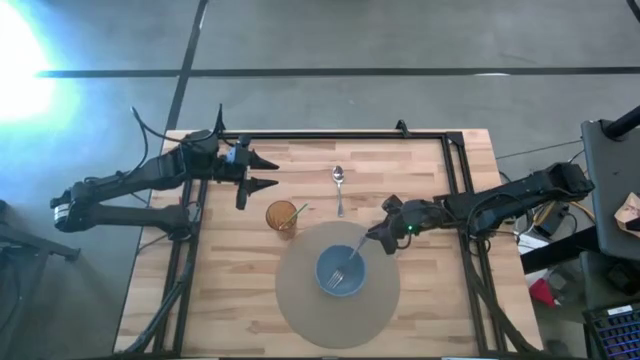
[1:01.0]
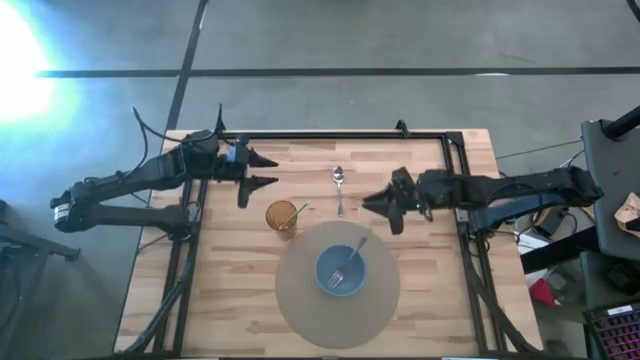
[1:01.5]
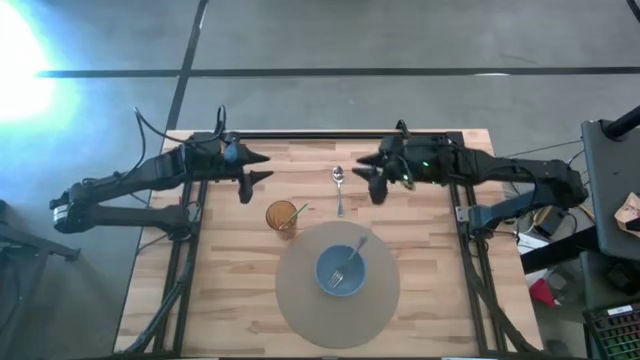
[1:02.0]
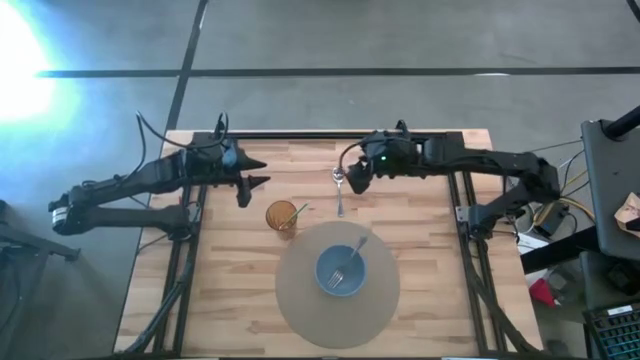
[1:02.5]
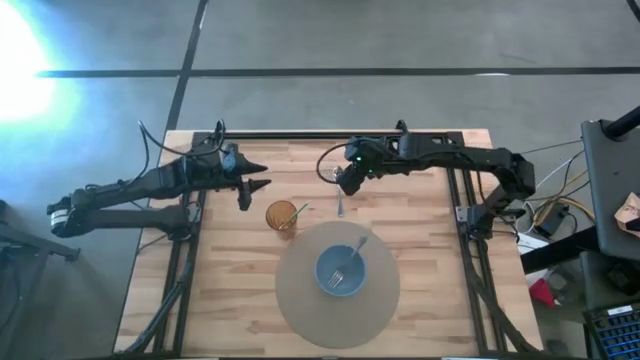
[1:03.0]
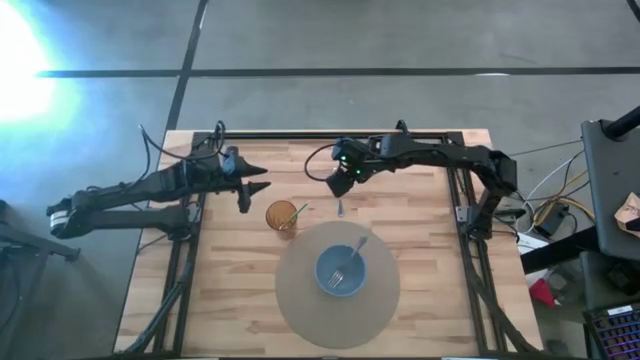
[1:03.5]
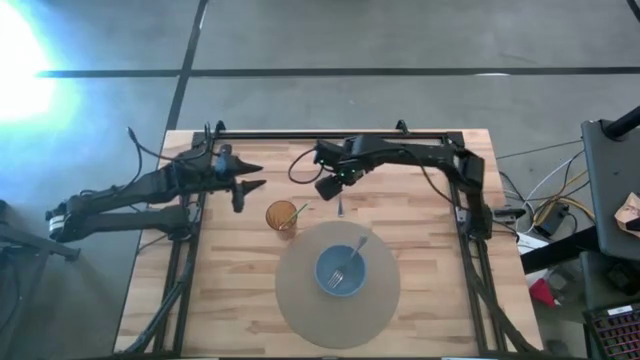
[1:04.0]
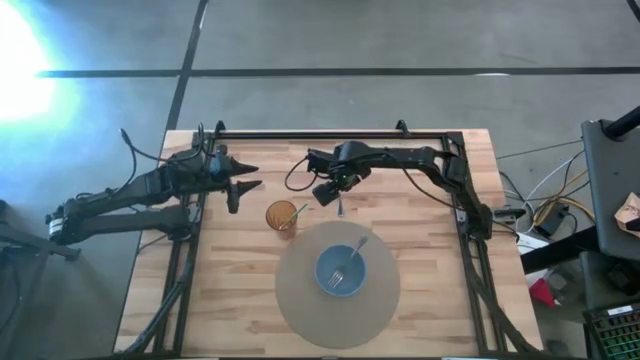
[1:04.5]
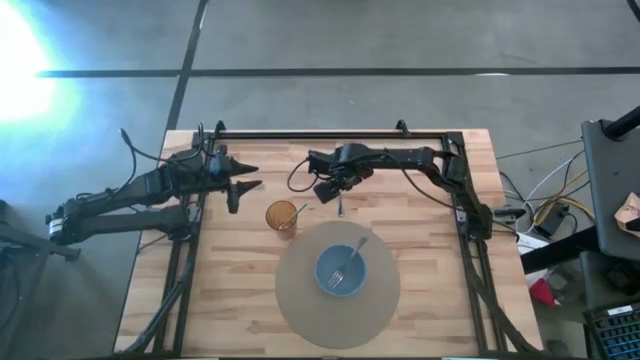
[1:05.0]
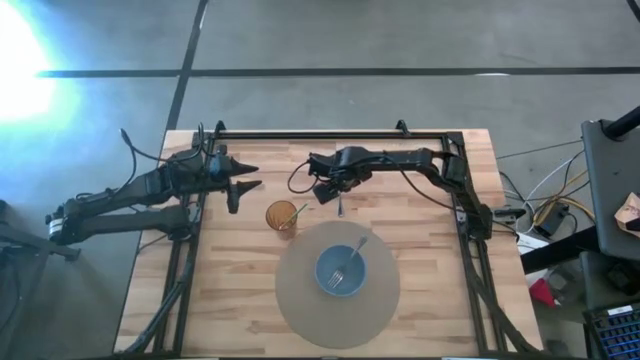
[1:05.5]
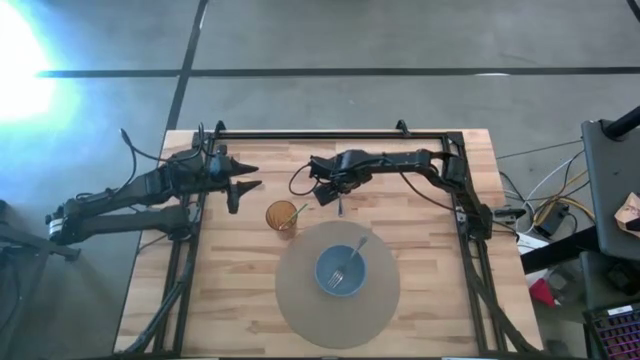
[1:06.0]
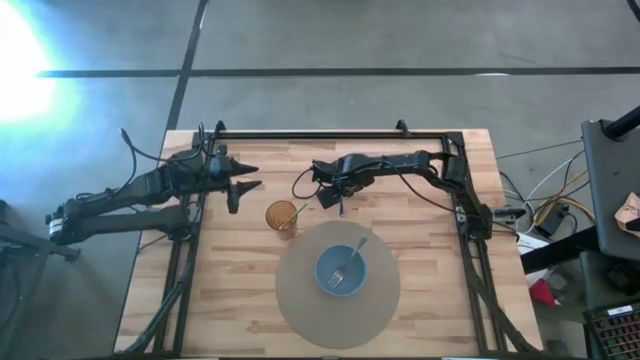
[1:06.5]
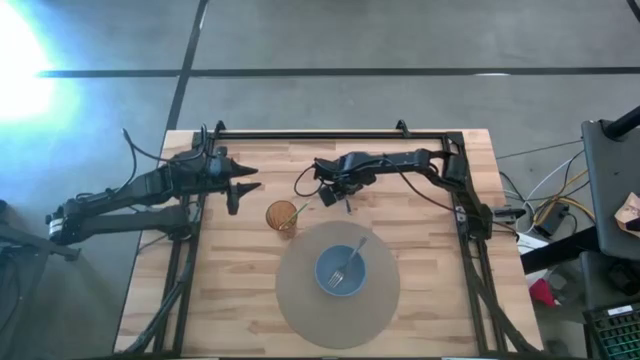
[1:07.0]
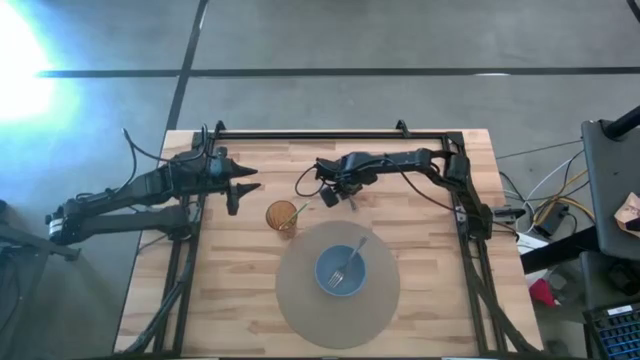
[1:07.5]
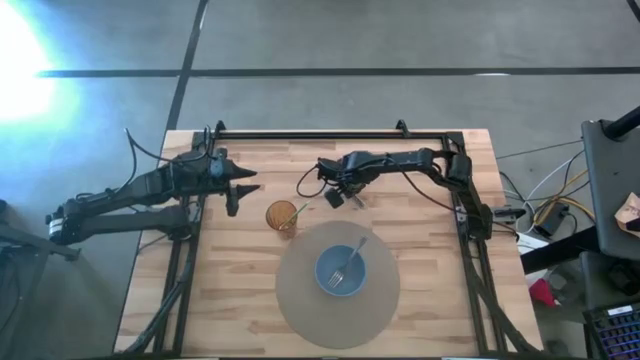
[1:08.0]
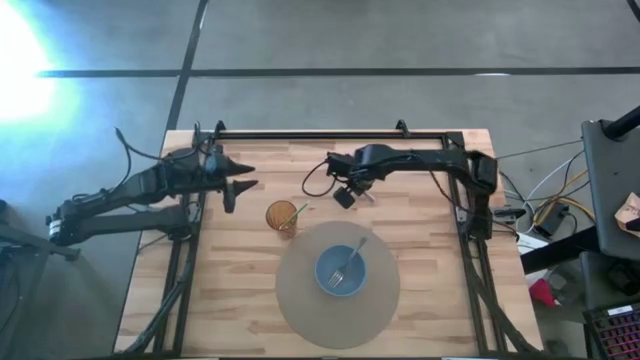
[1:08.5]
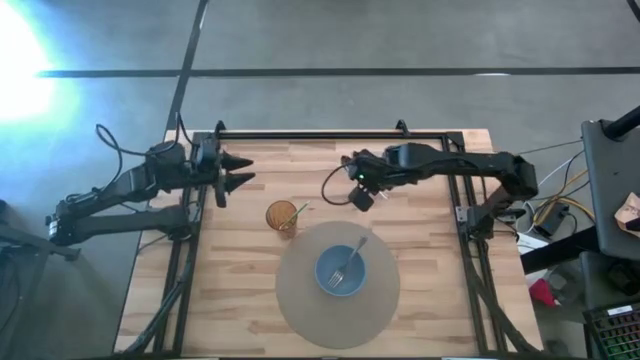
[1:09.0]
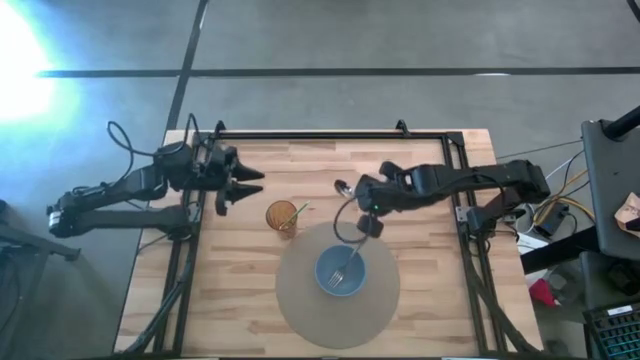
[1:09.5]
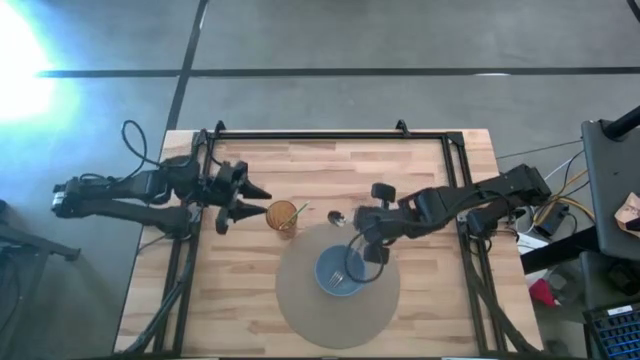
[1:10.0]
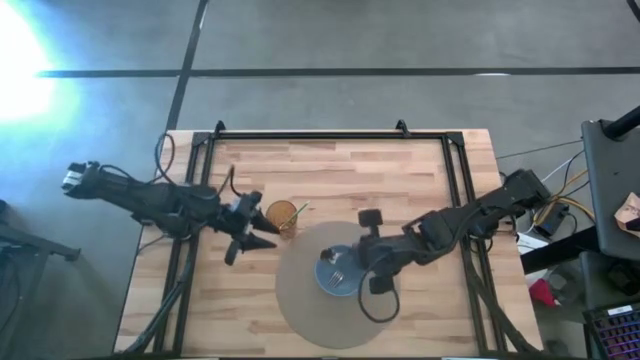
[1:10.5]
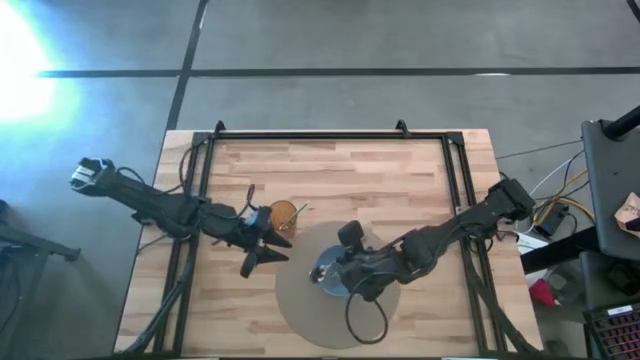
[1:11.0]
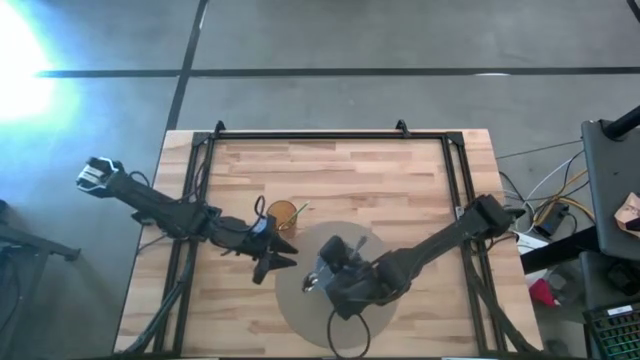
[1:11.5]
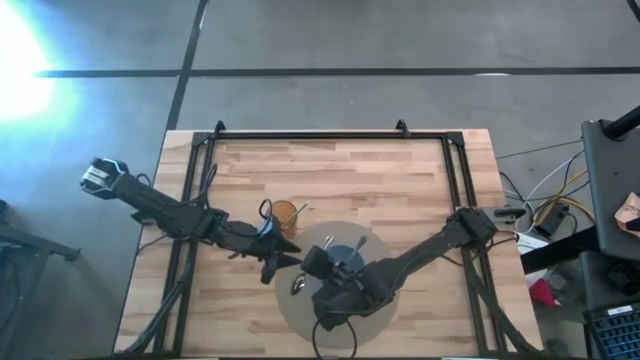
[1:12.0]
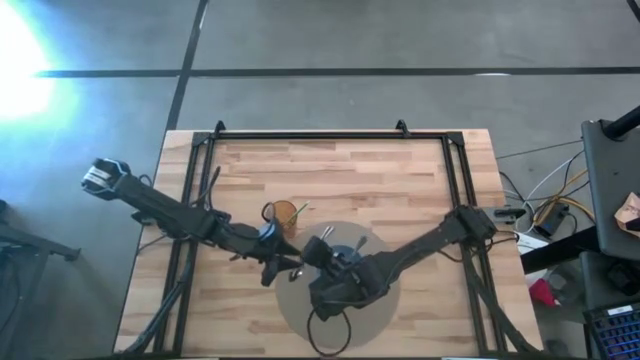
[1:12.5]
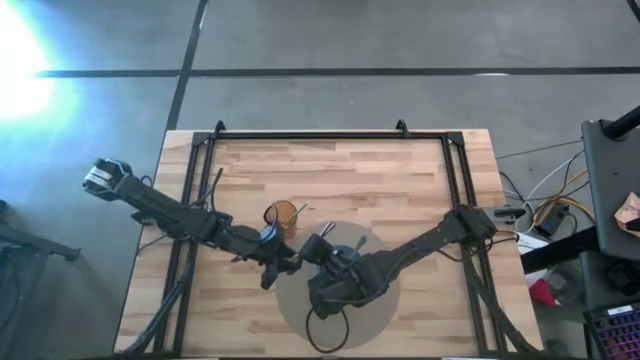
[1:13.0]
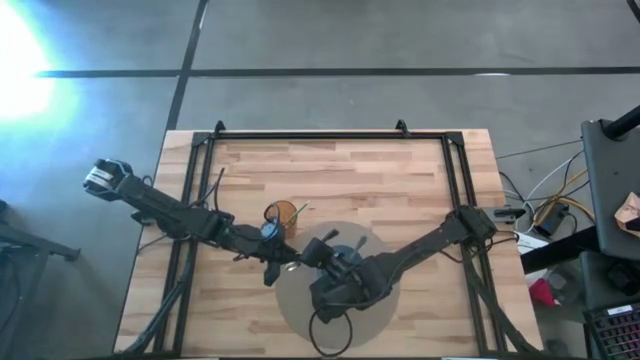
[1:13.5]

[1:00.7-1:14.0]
Task: Pick & Place Utensil
Put the silver spoon into the blue bowl

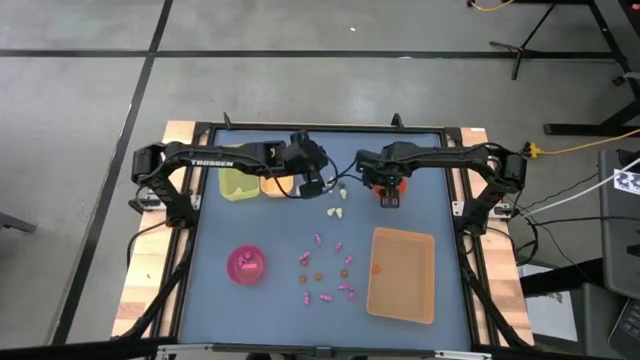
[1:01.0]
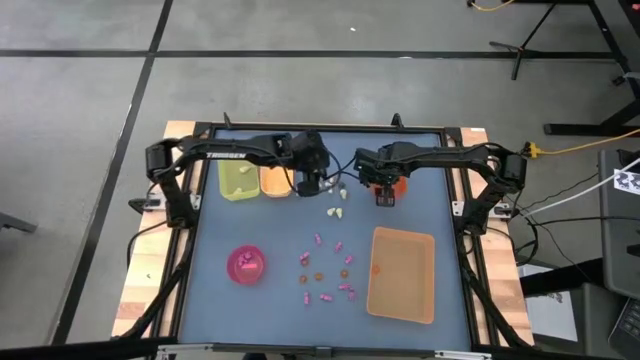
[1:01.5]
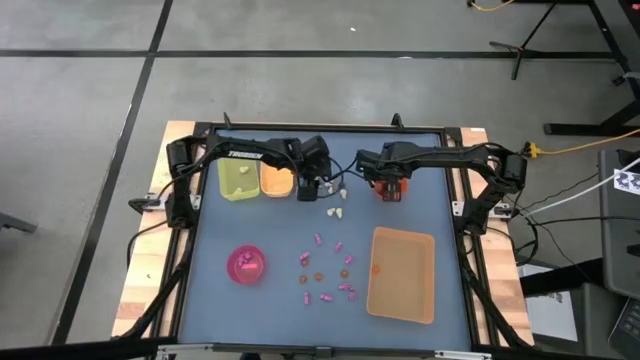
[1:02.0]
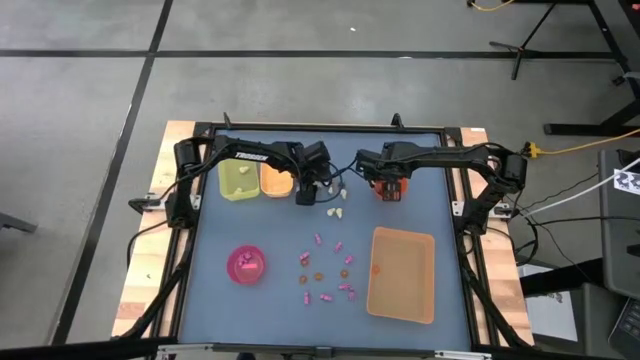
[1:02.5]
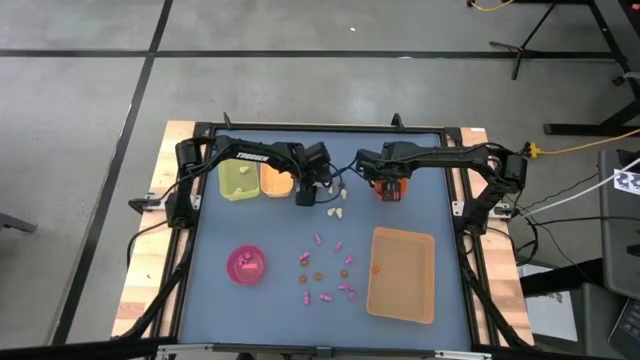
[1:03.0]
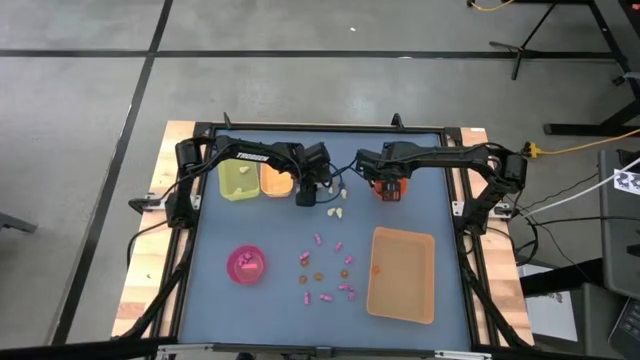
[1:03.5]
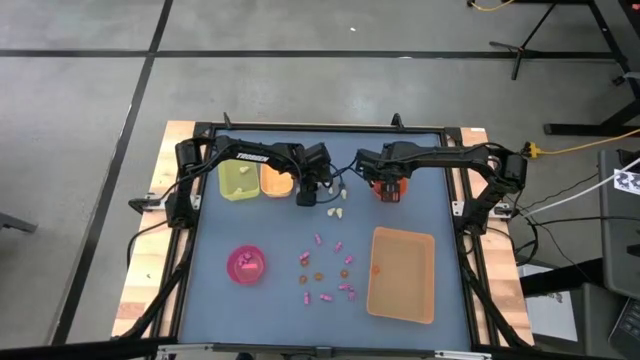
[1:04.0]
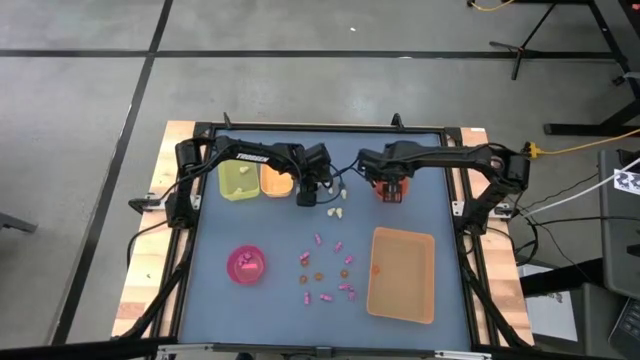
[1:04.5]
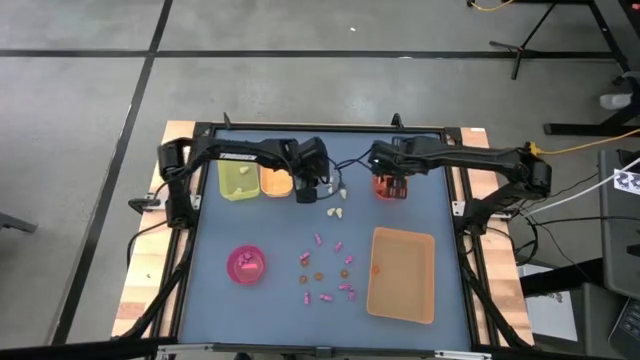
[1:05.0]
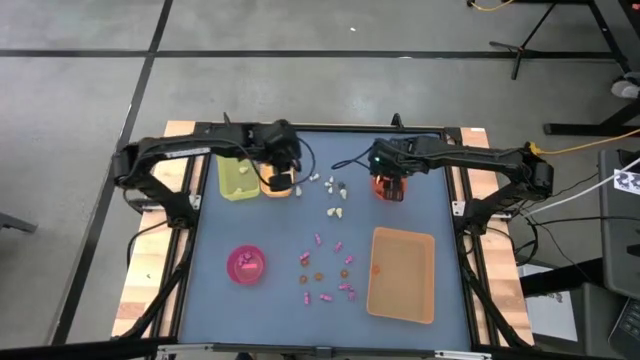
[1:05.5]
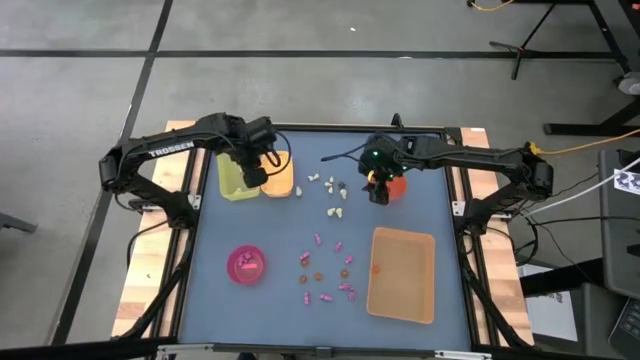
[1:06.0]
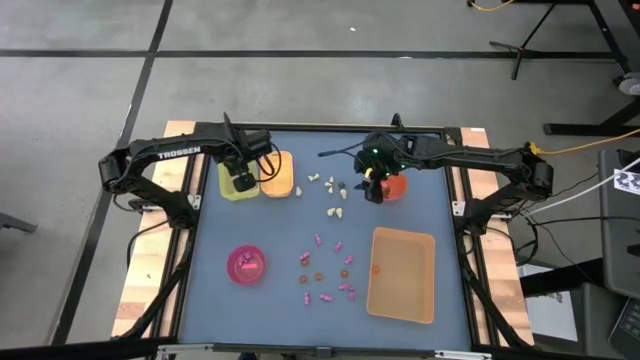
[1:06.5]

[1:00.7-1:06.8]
Task: Sort Halloween decoration
Put the white skull toy into the yellow bin
